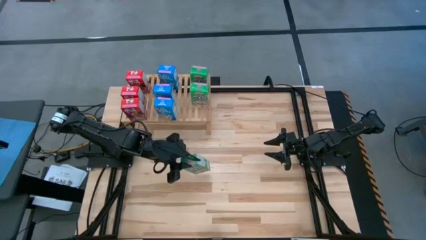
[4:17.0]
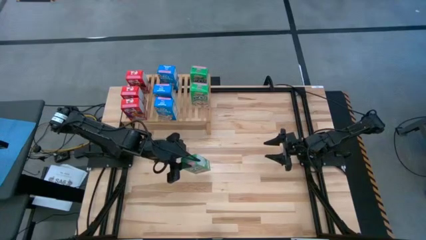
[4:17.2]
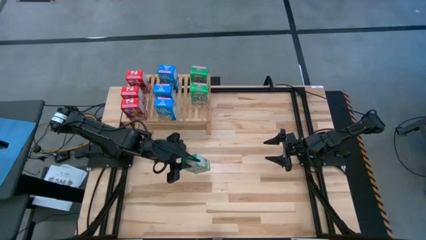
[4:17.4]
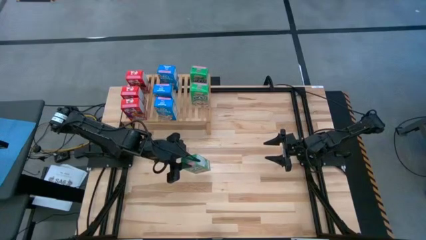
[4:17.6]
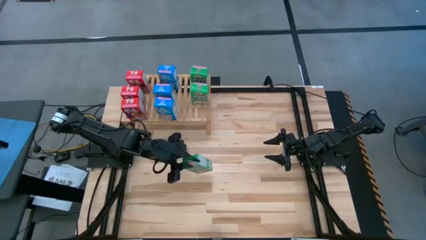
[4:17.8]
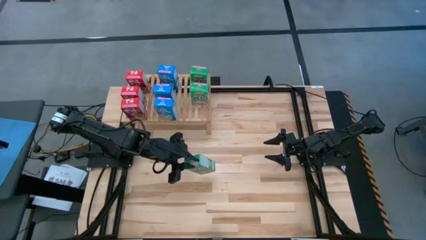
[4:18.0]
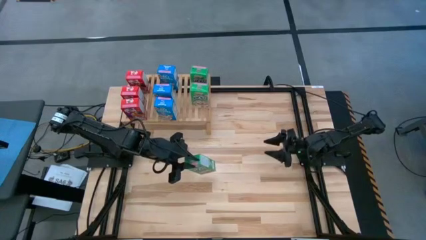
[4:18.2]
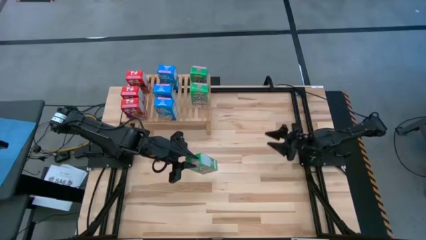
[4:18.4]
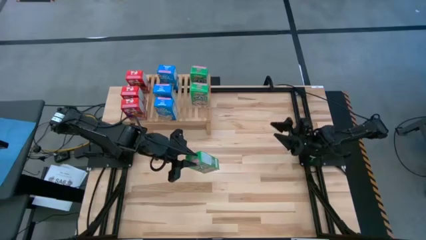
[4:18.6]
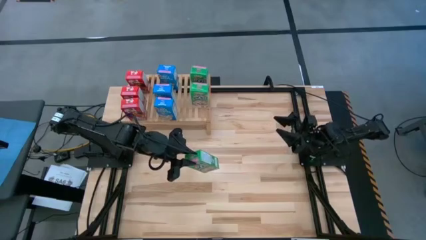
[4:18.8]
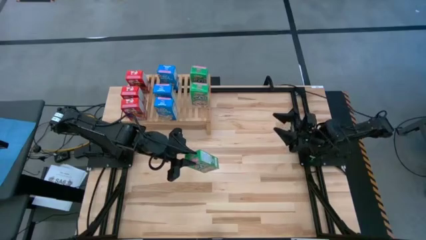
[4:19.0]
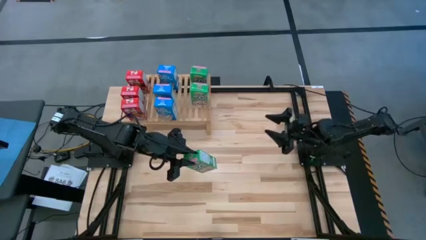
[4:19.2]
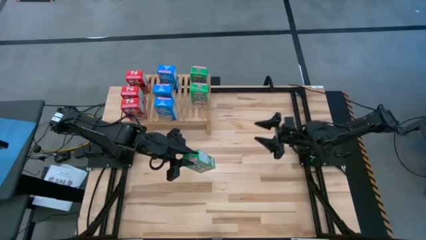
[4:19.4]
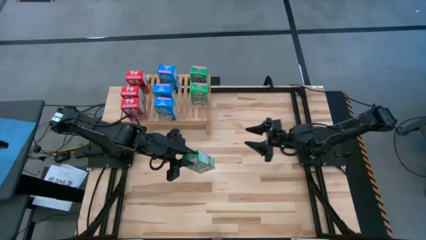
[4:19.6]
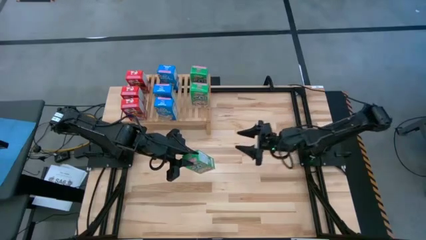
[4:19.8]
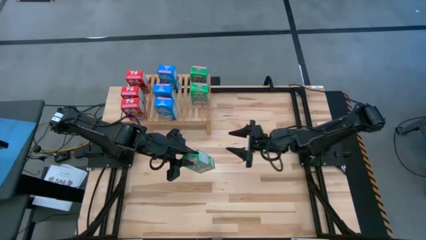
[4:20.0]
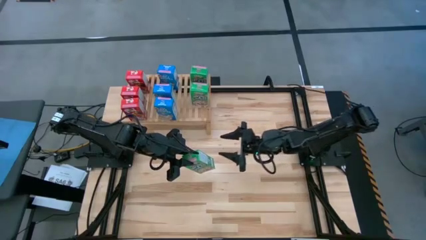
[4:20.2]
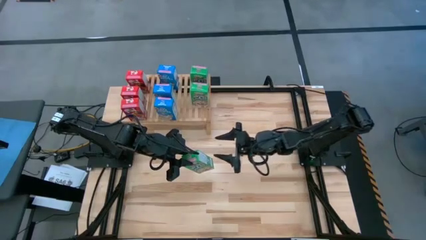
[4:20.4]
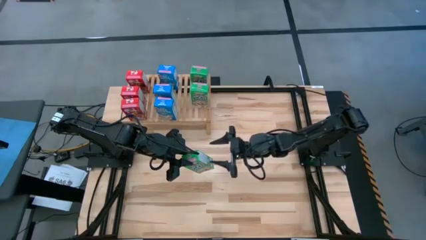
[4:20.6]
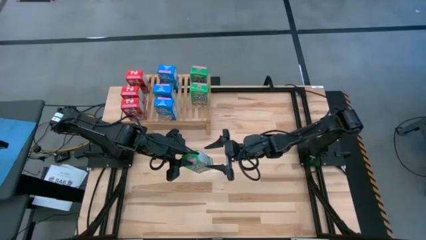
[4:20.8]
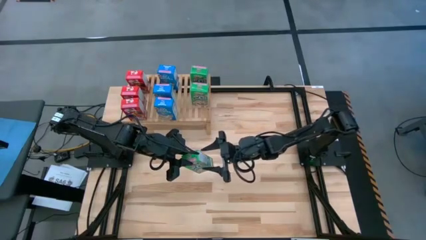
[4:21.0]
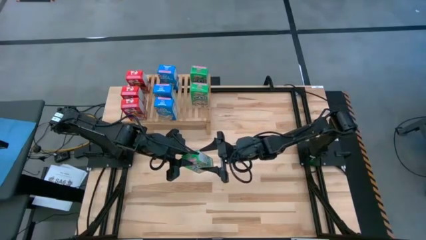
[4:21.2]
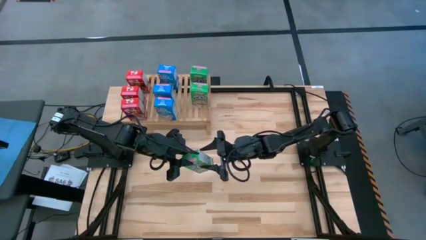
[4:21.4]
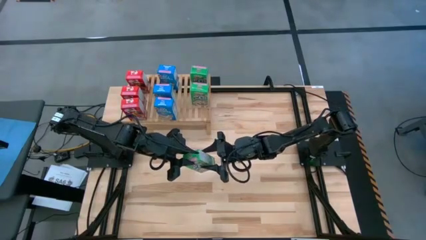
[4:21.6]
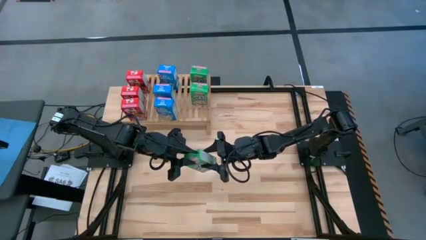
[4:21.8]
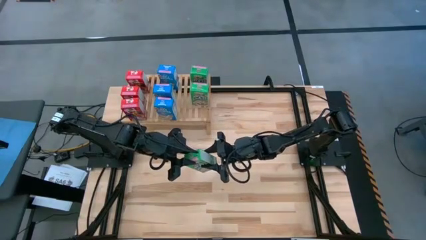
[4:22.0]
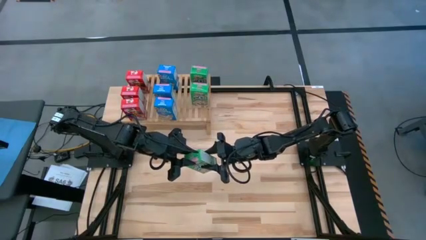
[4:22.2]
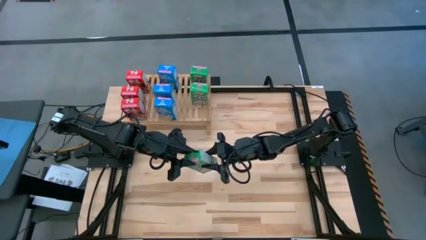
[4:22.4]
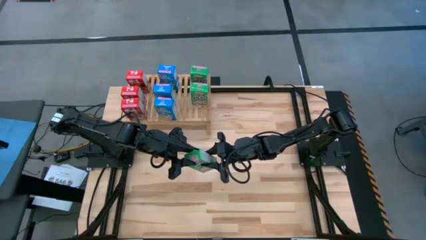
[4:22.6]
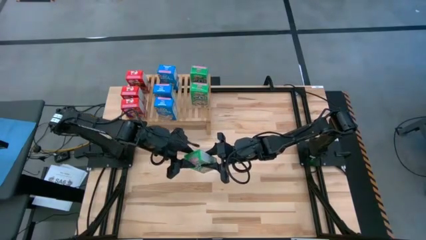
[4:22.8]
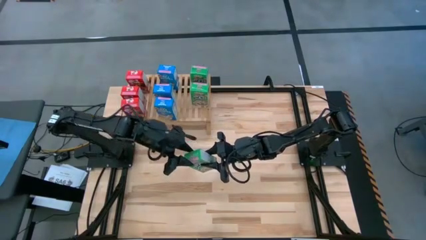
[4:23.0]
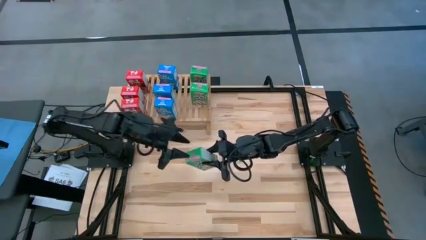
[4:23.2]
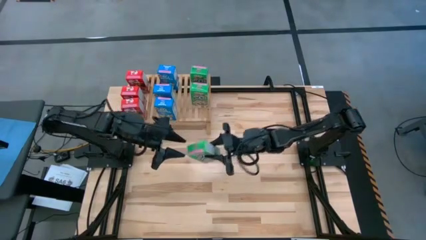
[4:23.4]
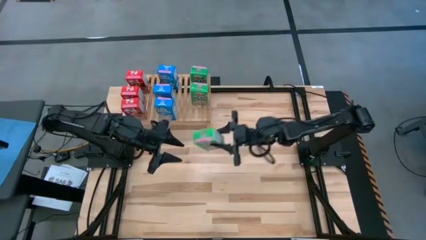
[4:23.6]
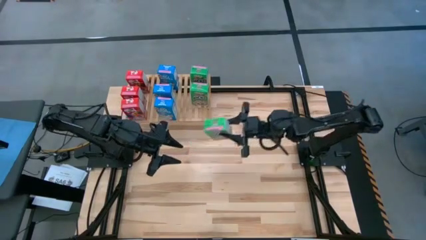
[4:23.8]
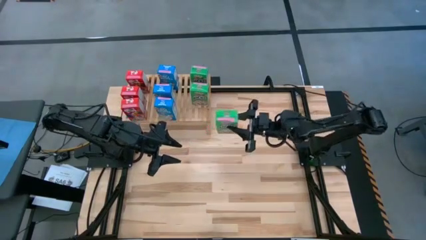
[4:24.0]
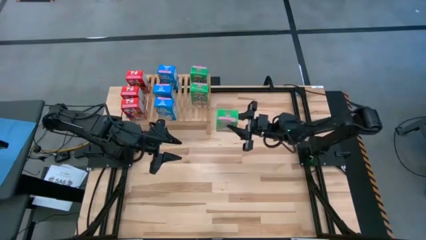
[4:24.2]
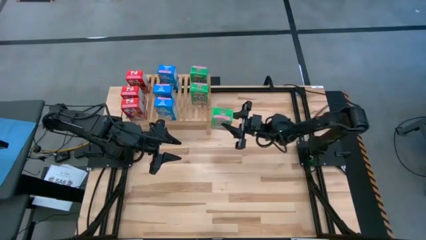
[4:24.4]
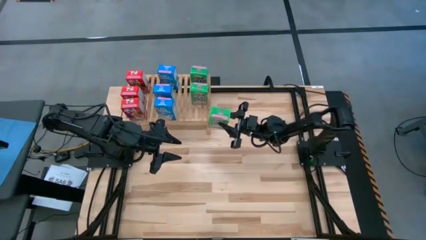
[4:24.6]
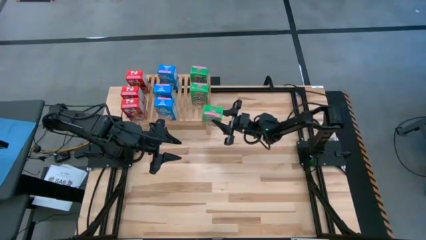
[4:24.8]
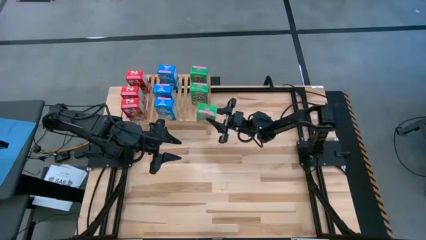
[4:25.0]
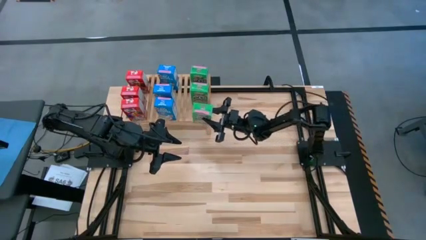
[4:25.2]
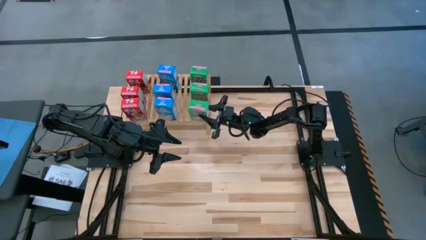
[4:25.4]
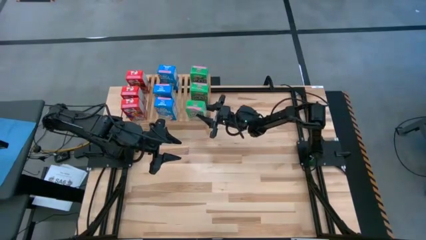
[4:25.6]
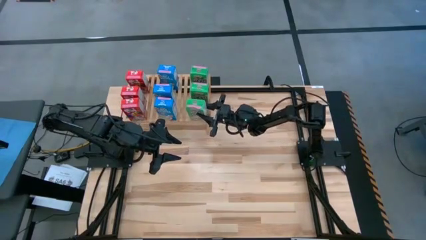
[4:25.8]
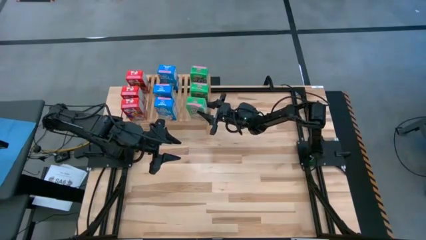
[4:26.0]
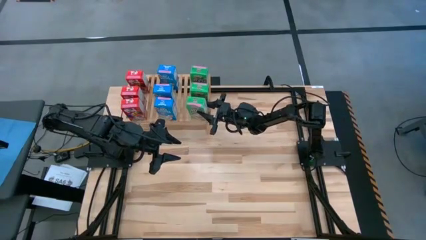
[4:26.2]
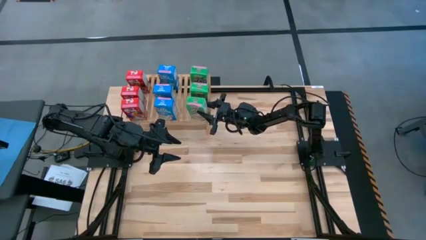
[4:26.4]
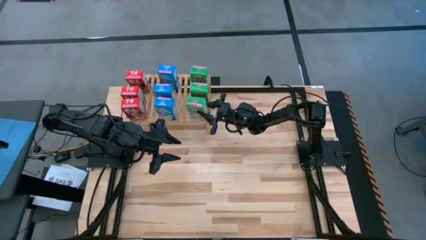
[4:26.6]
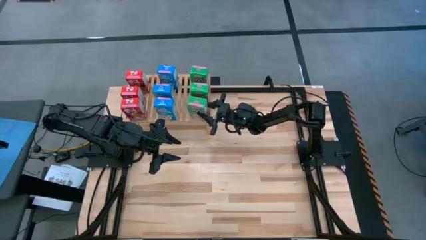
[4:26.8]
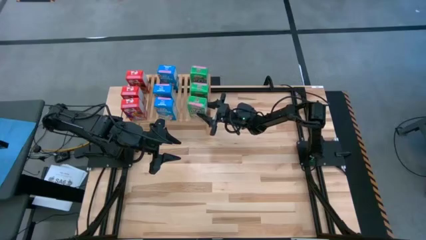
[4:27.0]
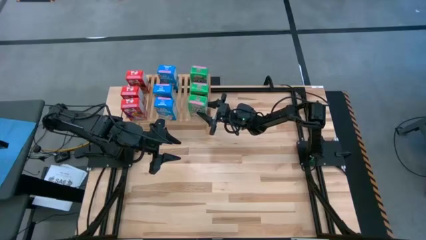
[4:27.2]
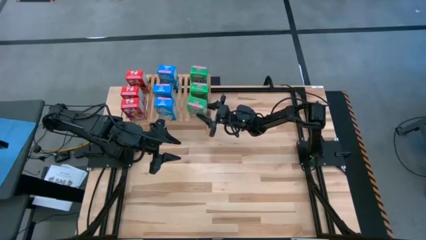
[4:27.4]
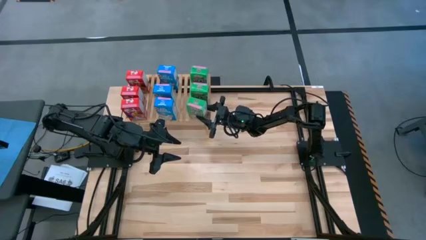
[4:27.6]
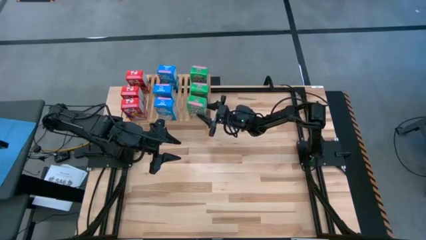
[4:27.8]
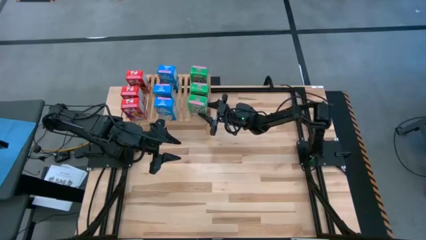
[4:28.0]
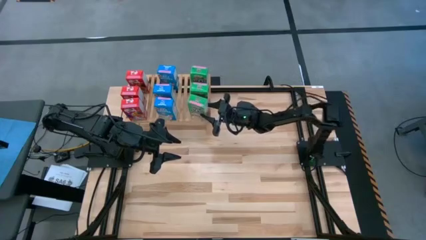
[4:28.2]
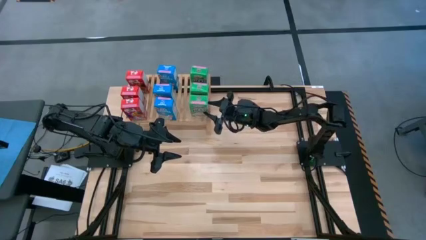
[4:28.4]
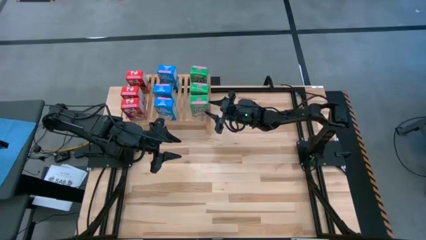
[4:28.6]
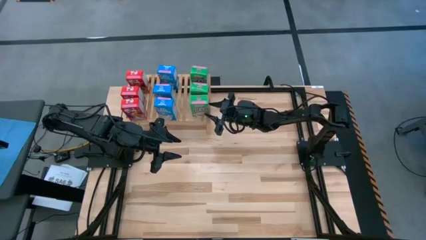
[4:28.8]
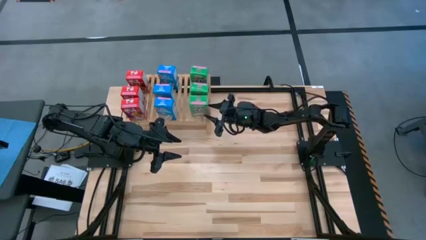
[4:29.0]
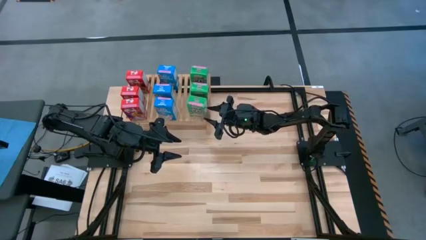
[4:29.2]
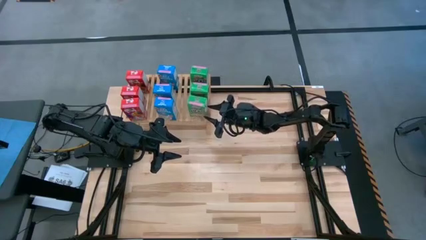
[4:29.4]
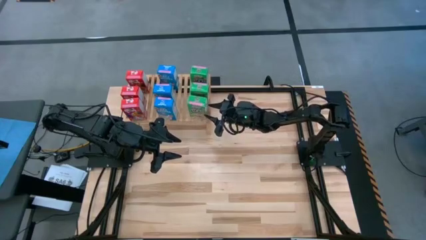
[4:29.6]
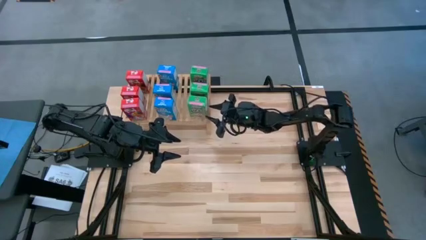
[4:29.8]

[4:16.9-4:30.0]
Task: Stack cereal on shelf
Put the green cereal box on the shelf aligned with the green cereal boxes

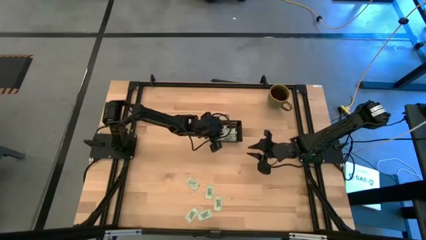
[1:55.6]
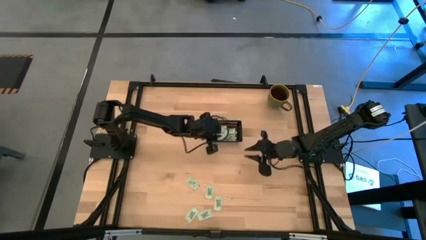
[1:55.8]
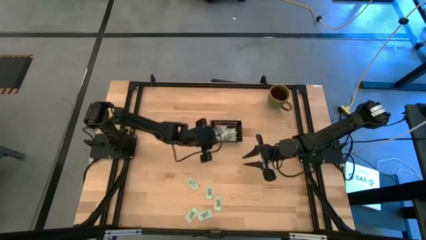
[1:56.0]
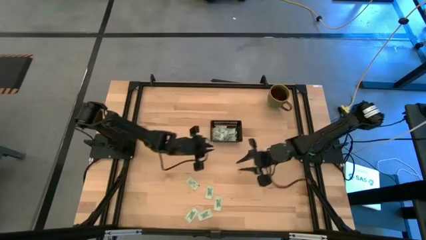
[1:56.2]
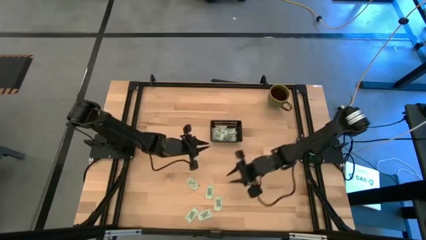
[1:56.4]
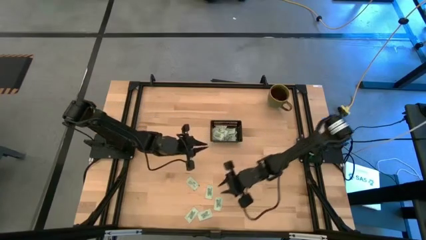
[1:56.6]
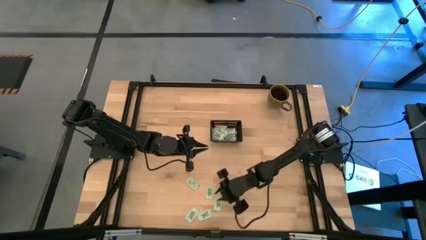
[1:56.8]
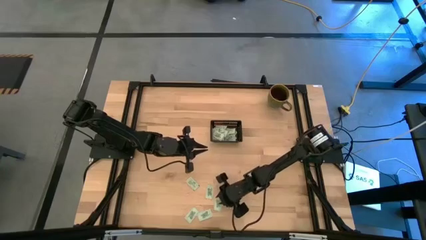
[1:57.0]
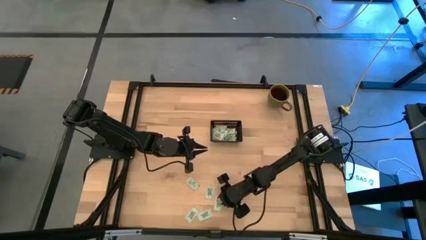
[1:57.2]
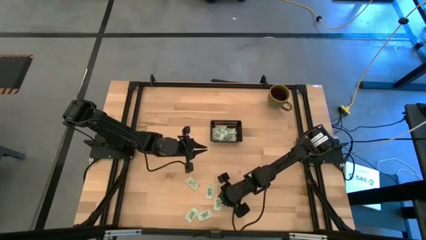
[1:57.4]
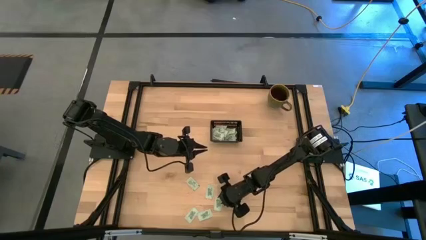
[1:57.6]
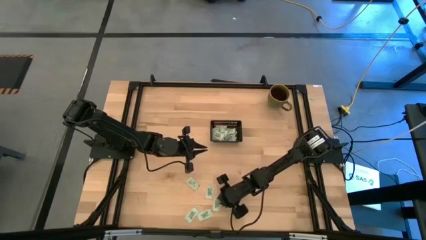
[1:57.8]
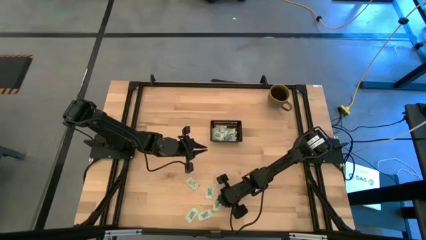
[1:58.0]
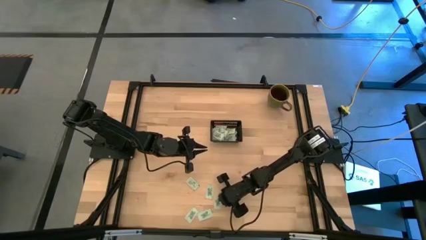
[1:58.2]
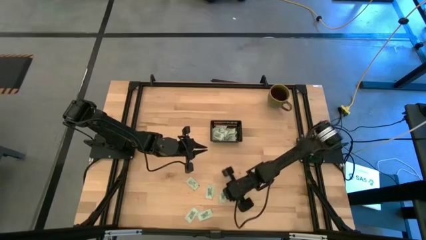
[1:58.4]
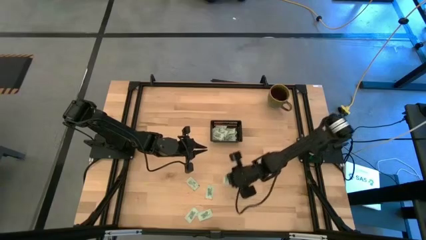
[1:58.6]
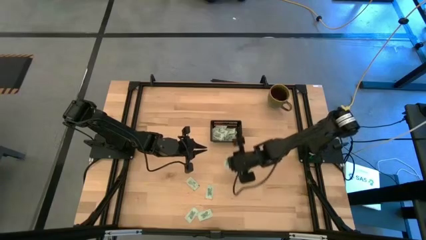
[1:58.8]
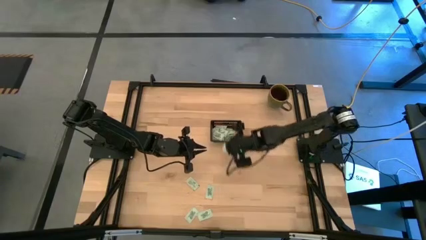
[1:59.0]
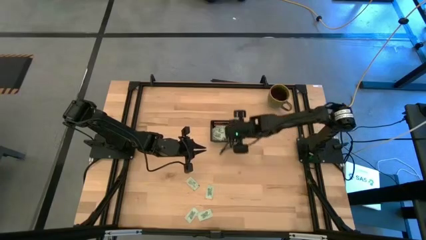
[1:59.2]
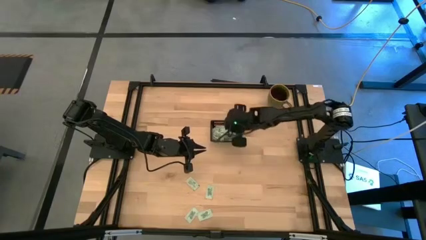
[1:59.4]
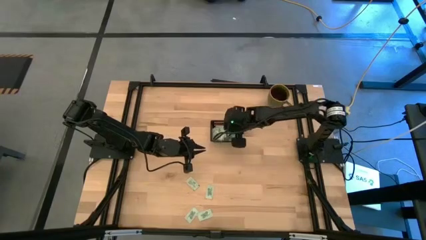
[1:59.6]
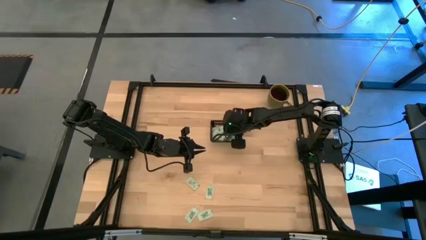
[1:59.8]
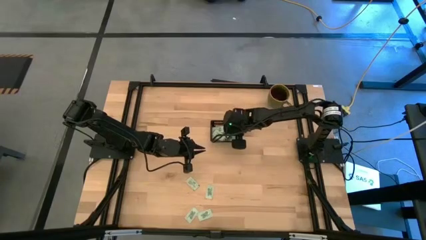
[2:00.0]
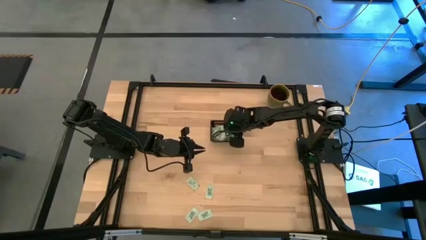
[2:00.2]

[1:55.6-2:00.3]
Task: Pick and place Stevia / Truvia into bins
Put the stevia packet into the black basket
